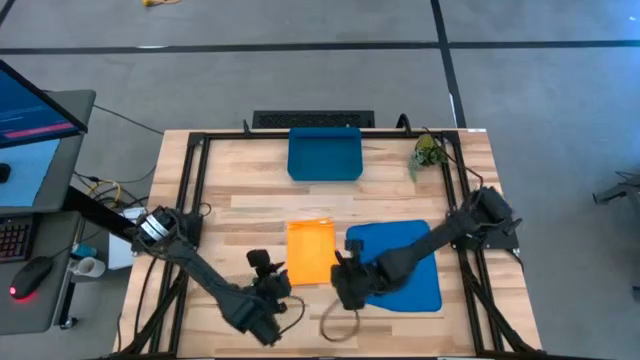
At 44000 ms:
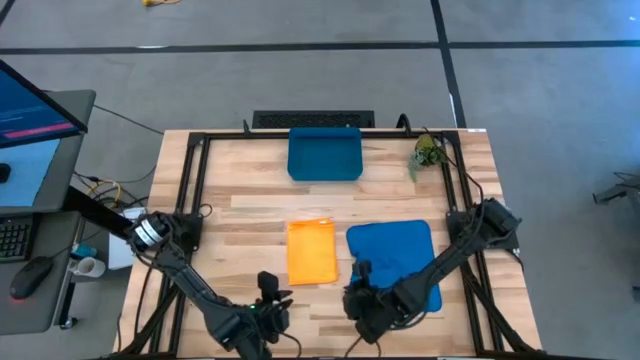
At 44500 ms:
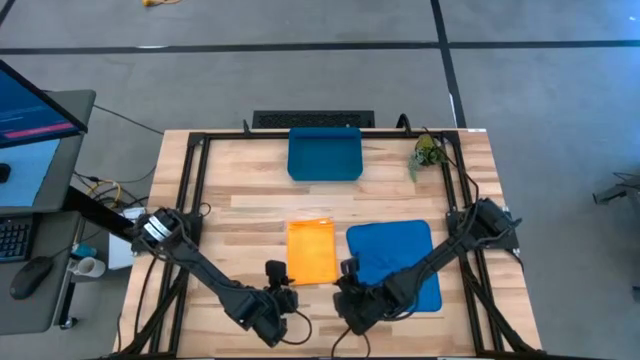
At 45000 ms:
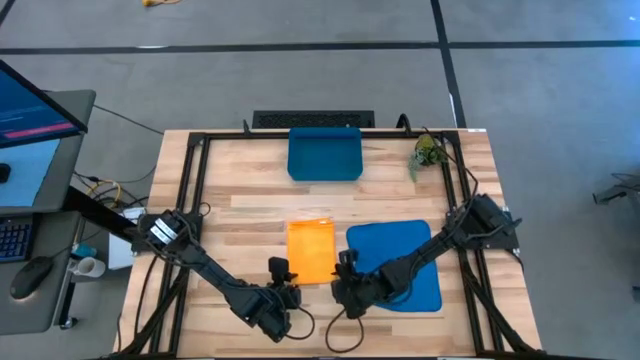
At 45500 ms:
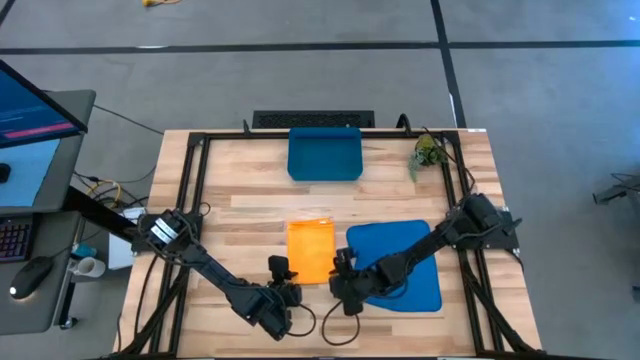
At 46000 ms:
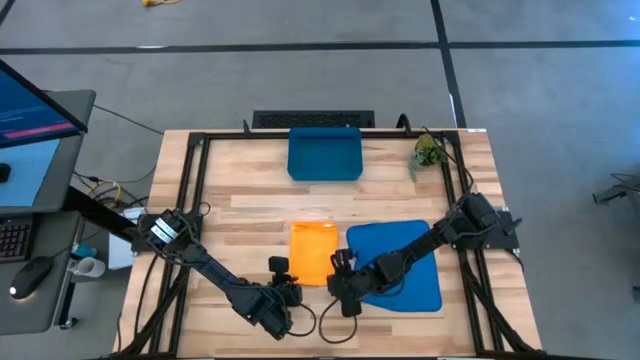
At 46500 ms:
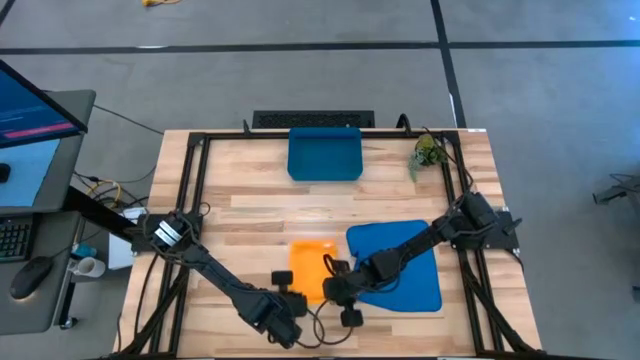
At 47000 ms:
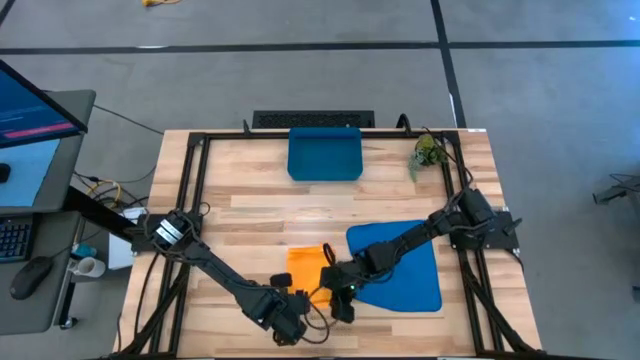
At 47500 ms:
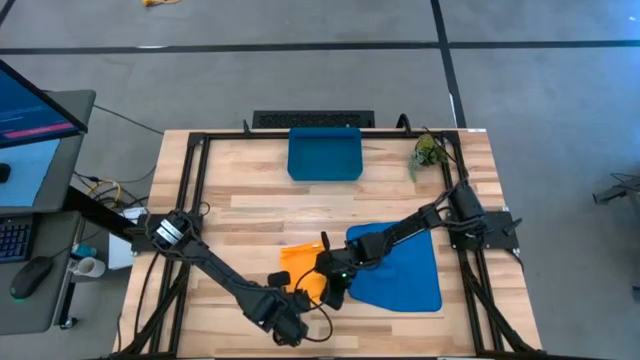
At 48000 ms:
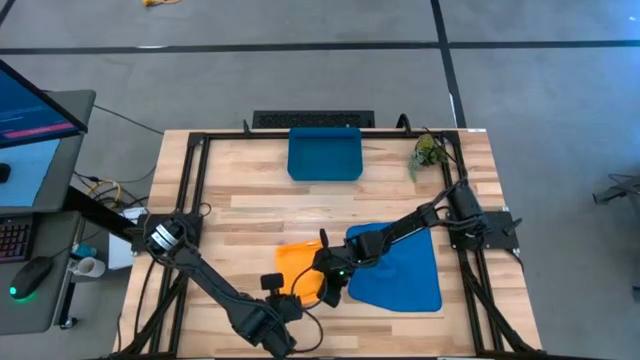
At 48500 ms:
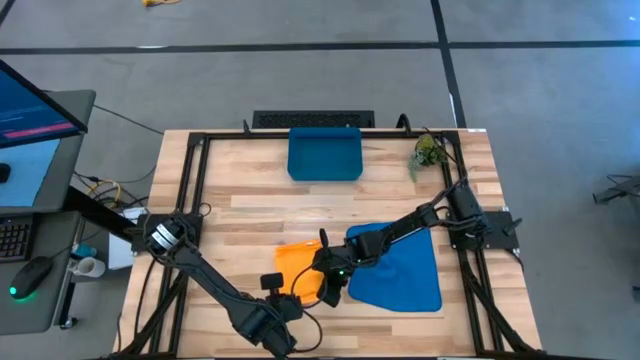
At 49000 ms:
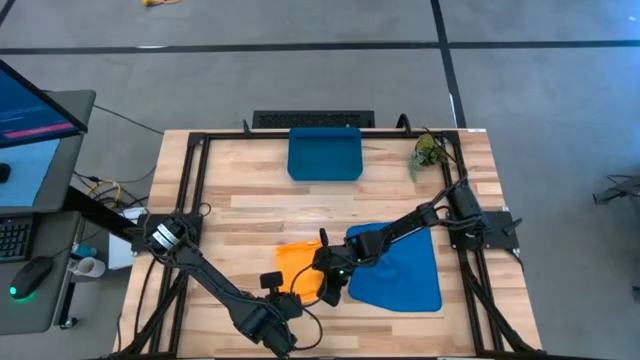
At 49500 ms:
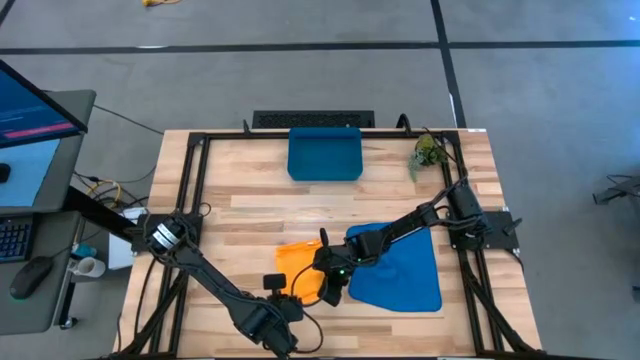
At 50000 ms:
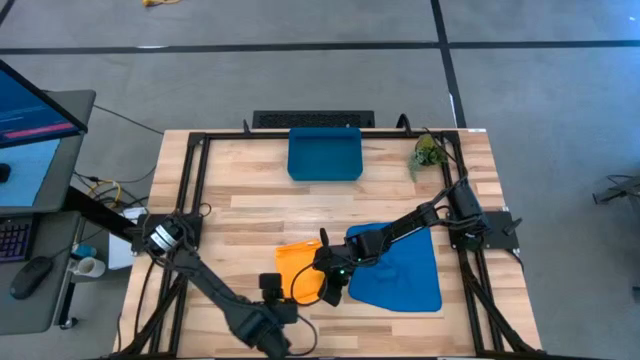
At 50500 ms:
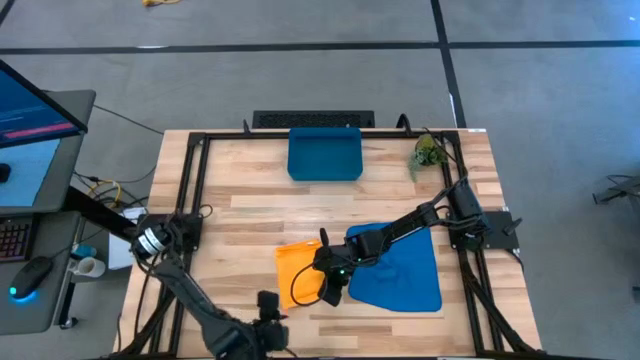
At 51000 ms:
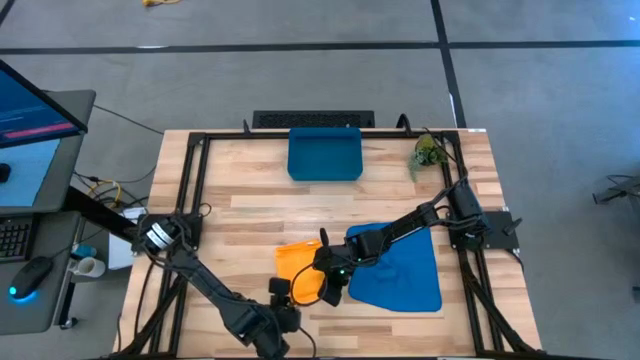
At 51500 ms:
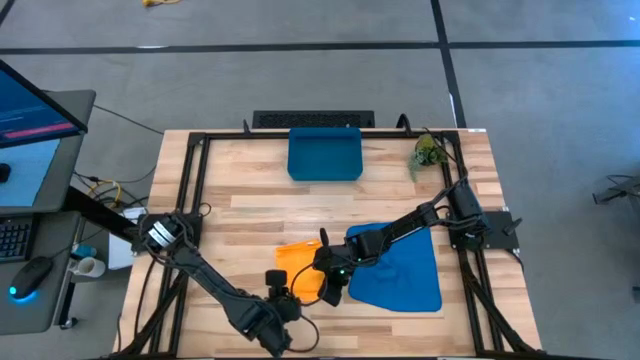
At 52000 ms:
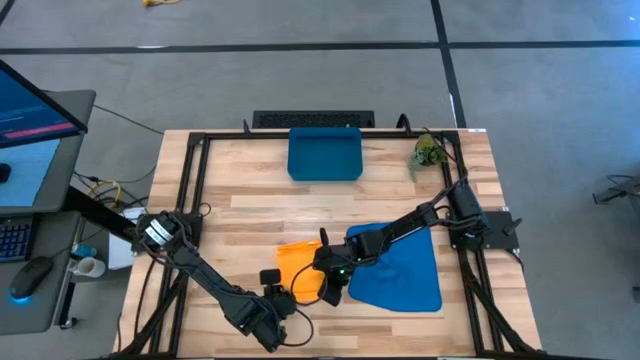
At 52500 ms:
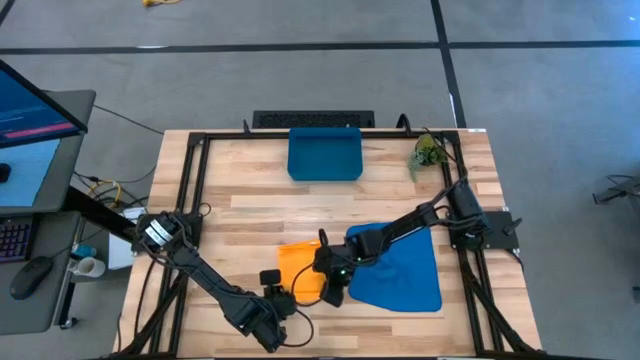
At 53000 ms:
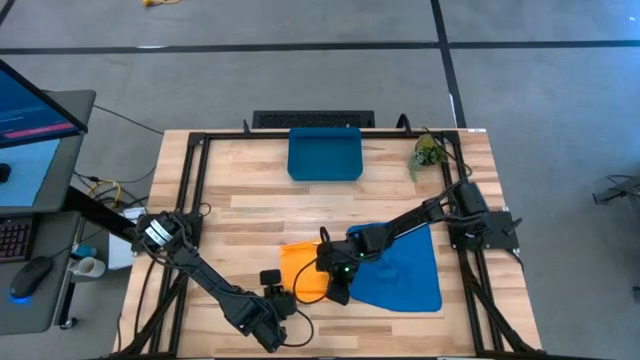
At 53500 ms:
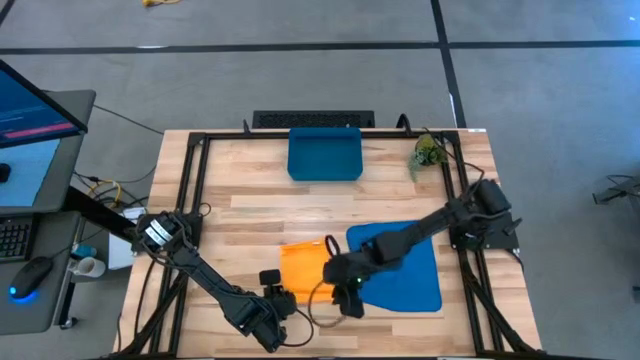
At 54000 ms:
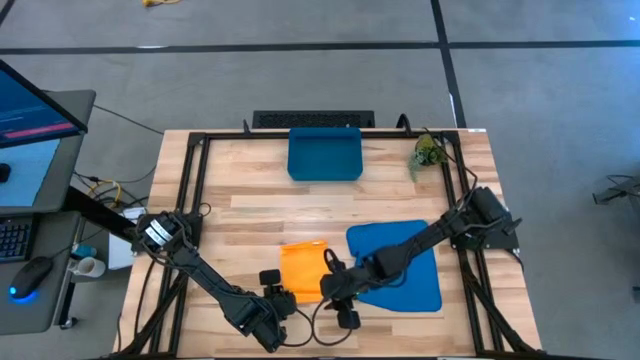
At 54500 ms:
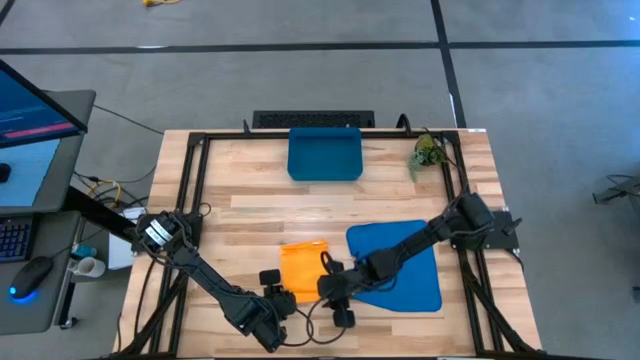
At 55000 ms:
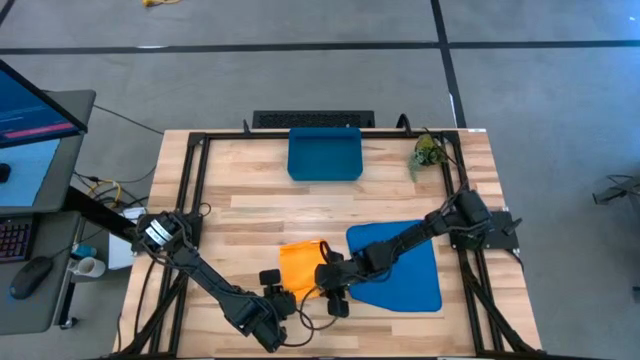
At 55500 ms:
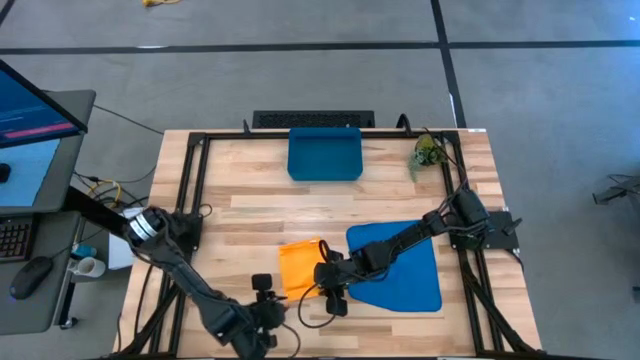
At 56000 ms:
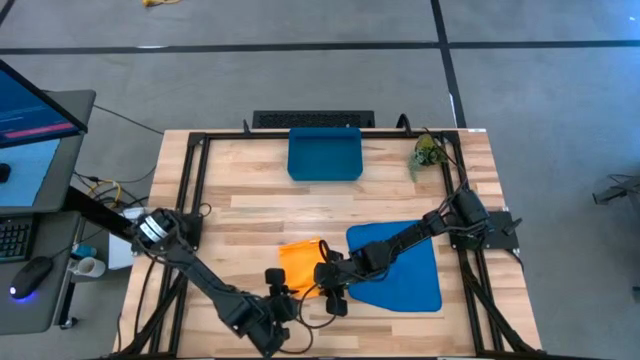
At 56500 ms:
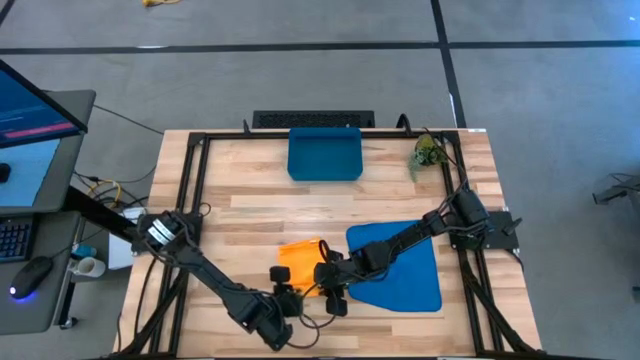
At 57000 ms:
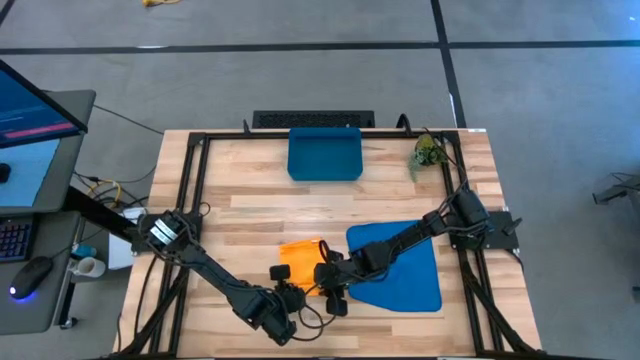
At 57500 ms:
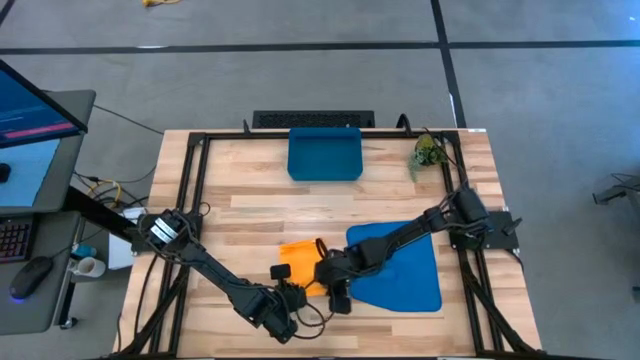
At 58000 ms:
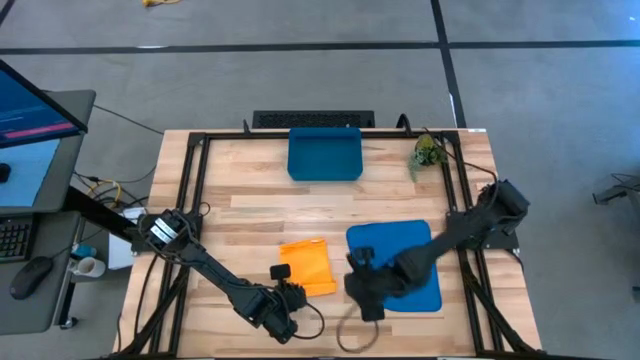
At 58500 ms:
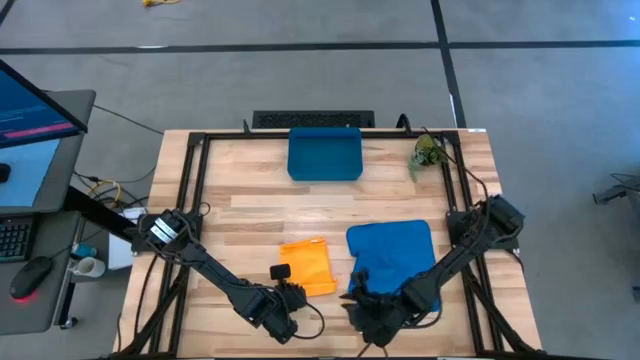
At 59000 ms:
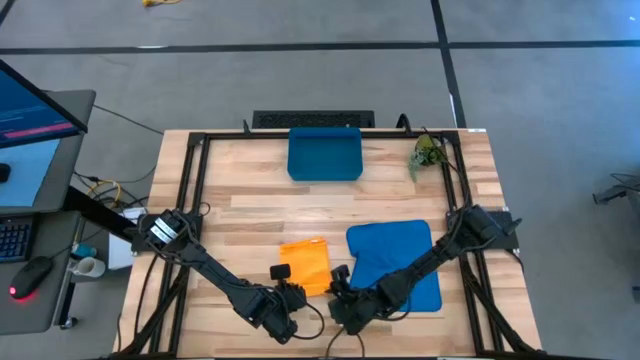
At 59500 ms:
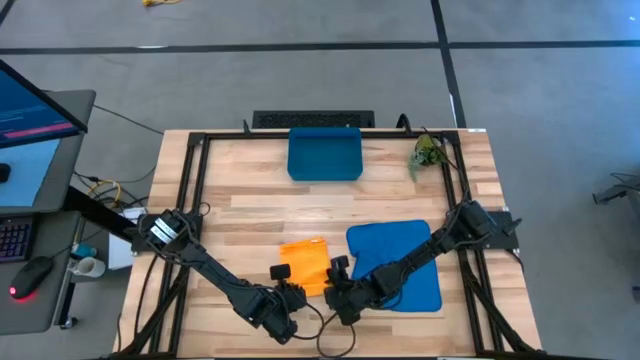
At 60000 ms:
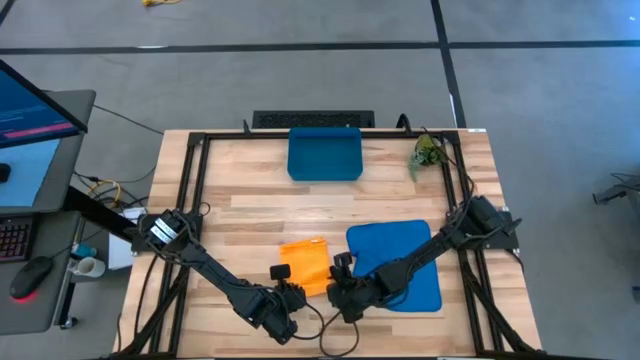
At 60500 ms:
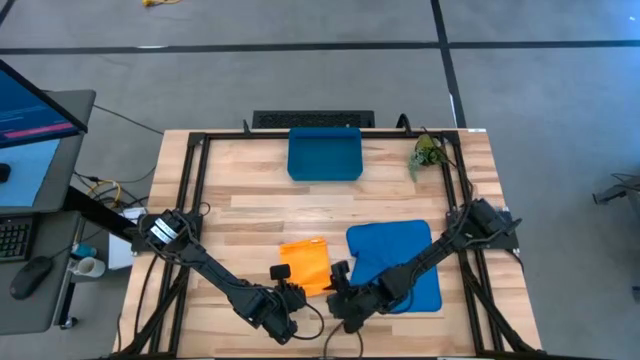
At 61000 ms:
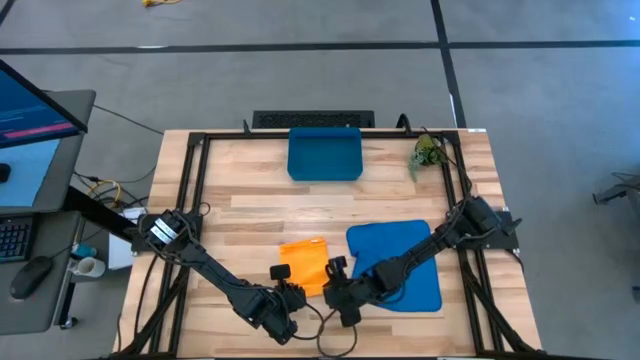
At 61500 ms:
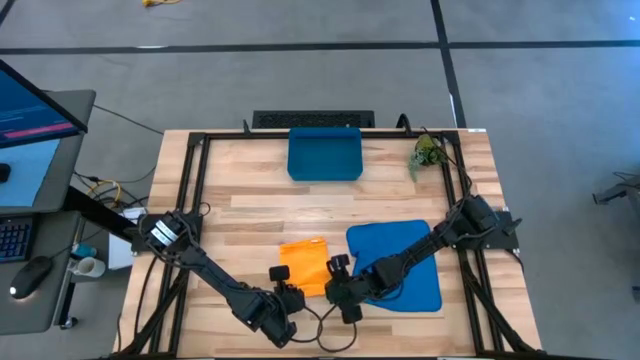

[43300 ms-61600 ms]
Task: Roll microfiber towels into tight, uniform cylinder then place into a basket
Roll the yellow microfiber cloth

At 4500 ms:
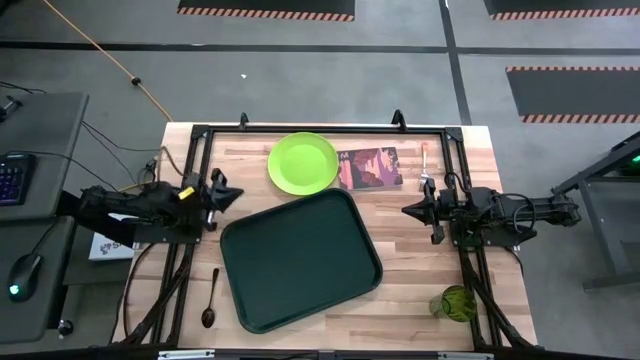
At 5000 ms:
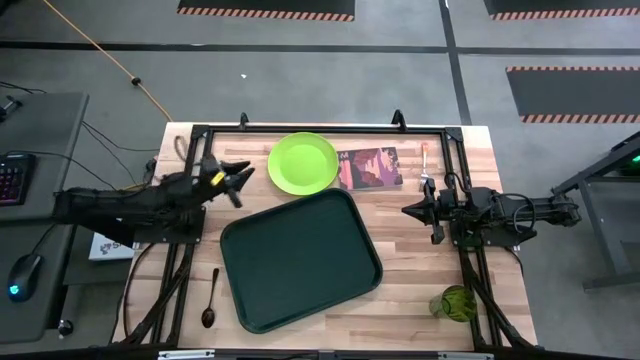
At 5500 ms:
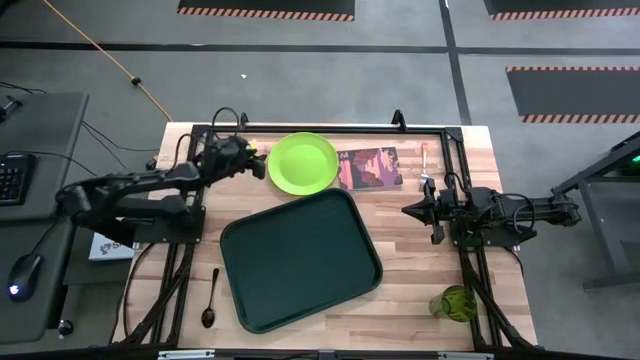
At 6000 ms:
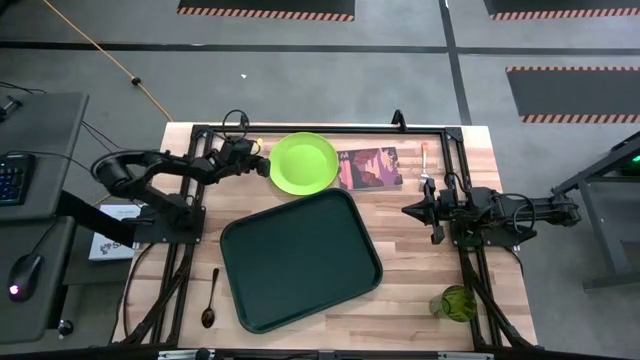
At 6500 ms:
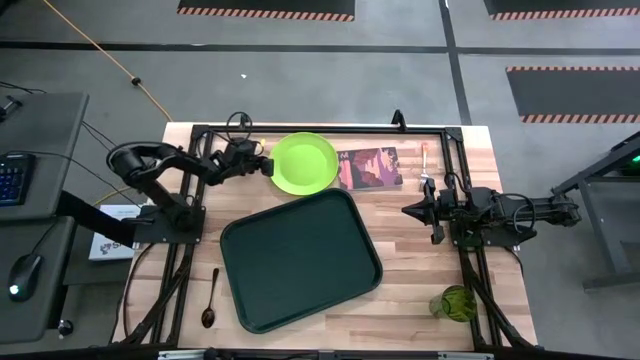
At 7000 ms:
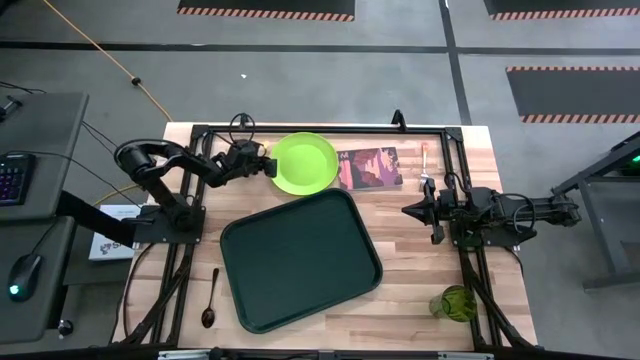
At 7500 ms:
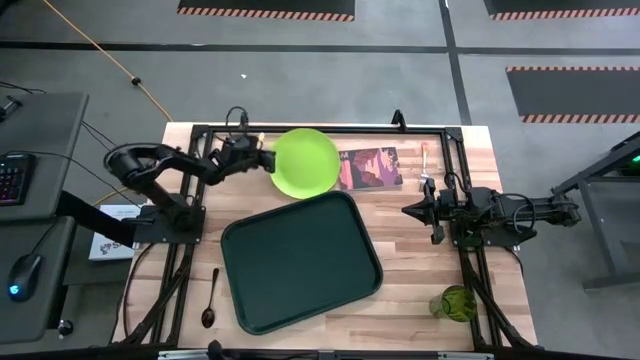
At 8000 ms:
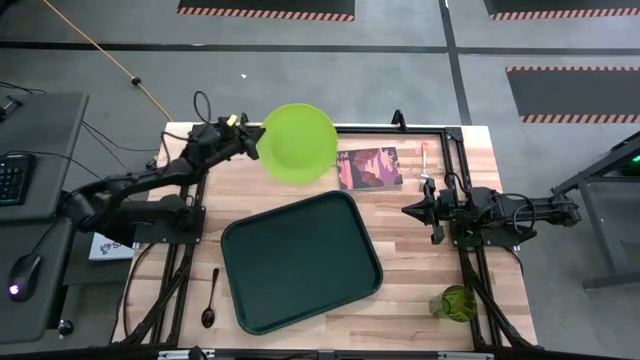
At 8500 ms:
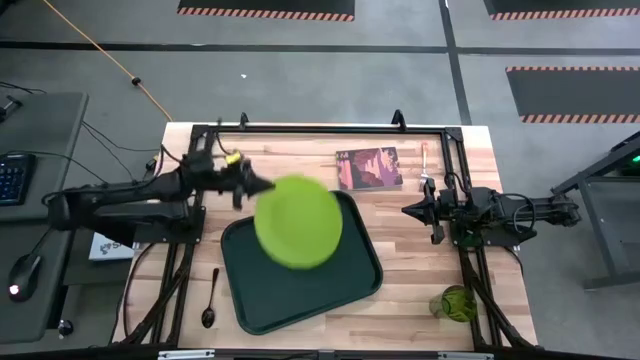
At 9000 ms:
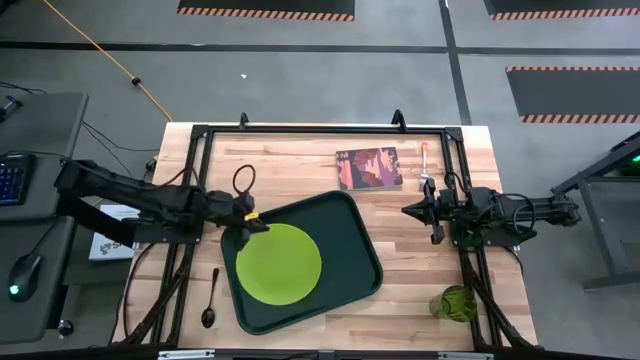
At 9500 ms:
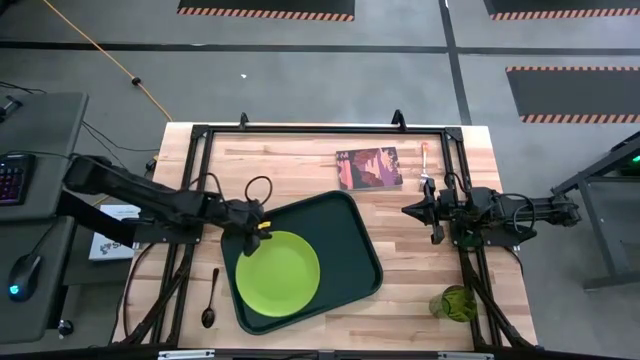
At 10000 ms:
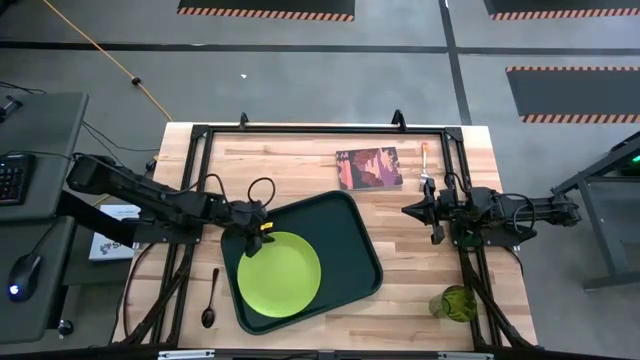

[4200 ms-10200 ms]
Task: Pick and place plate/cup/fork/spoon on tray
Put the green plate on the black tray
